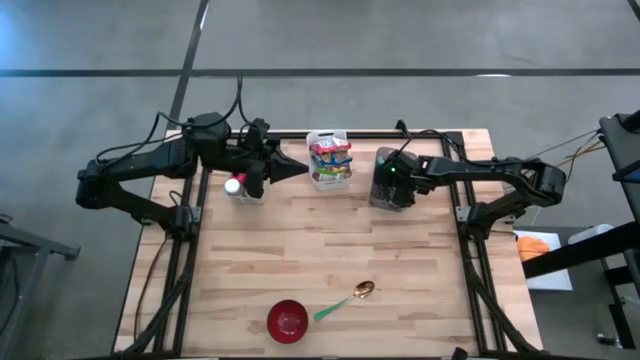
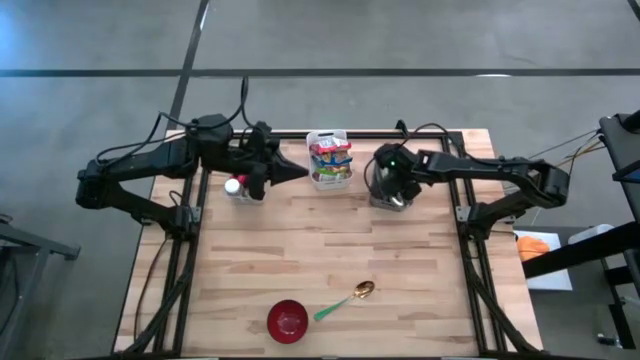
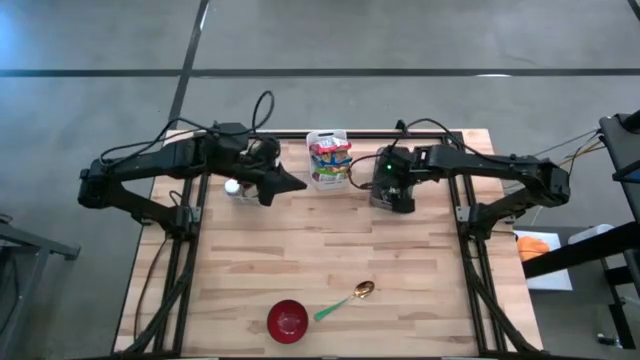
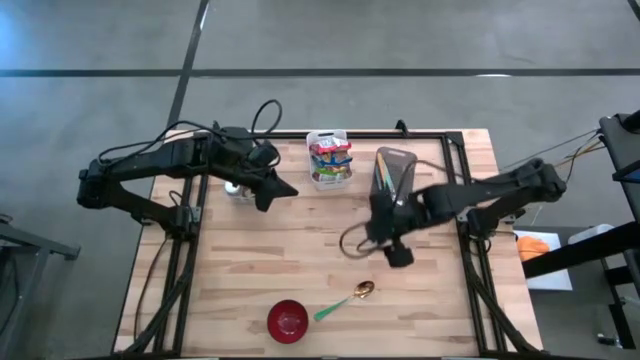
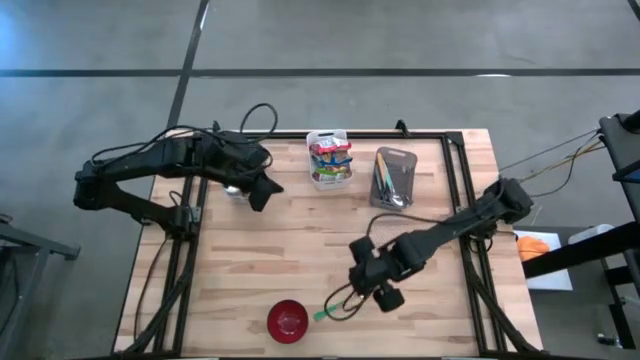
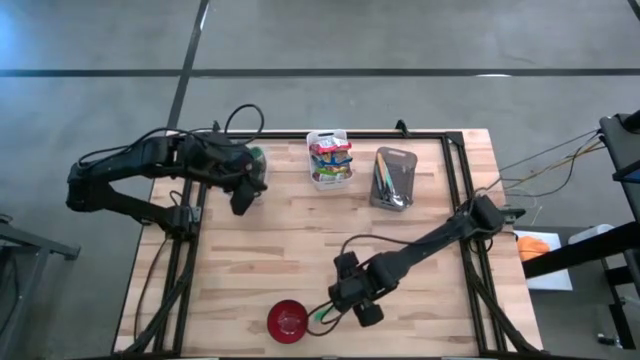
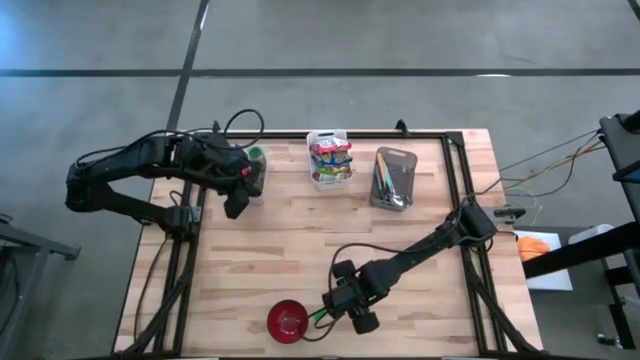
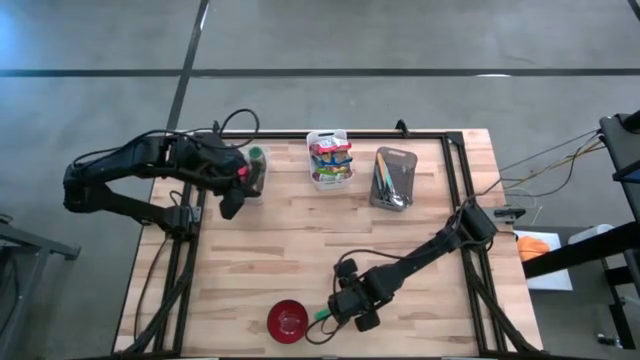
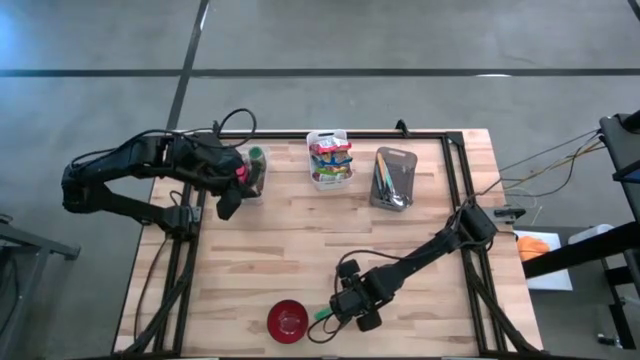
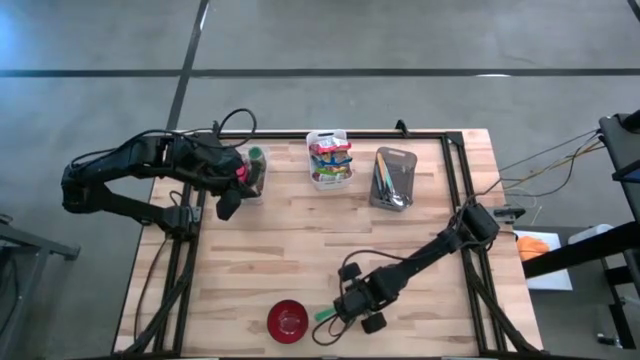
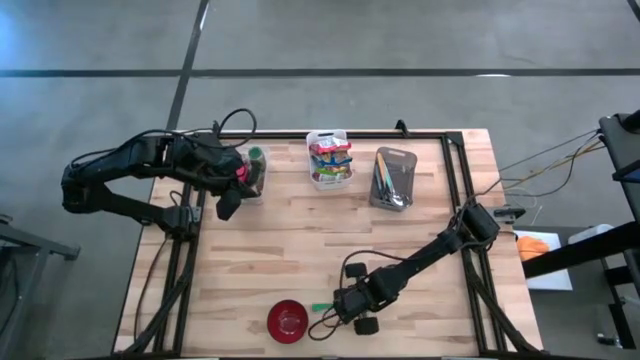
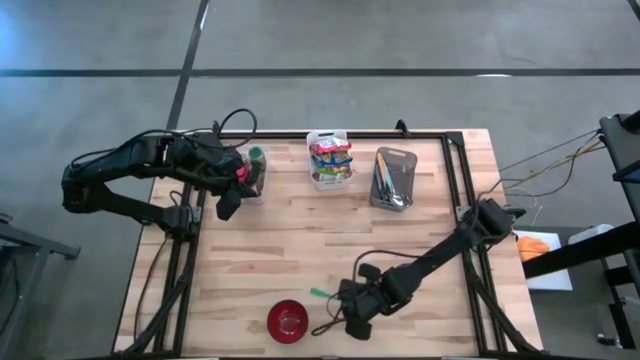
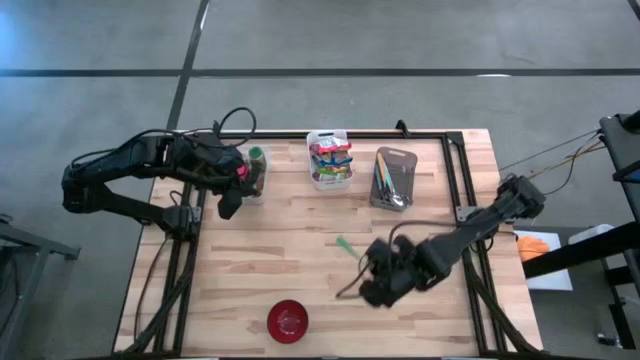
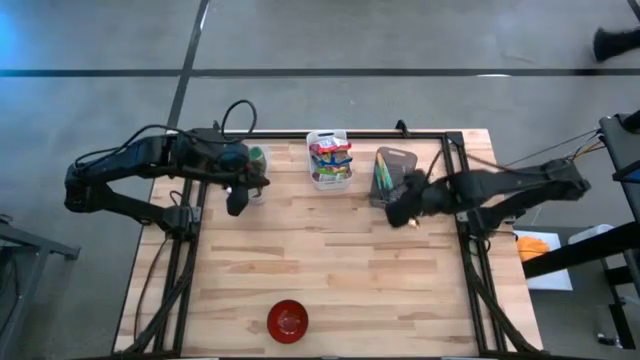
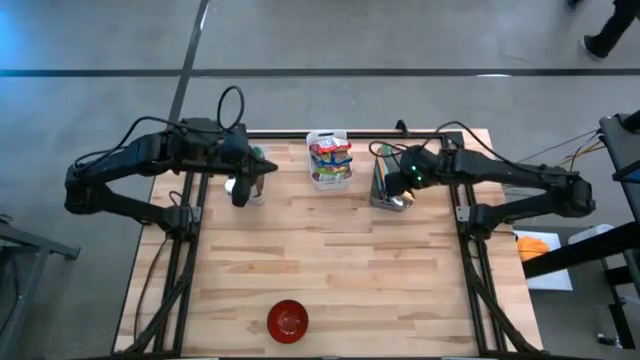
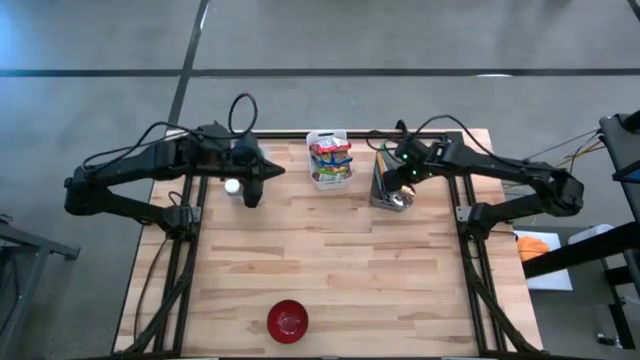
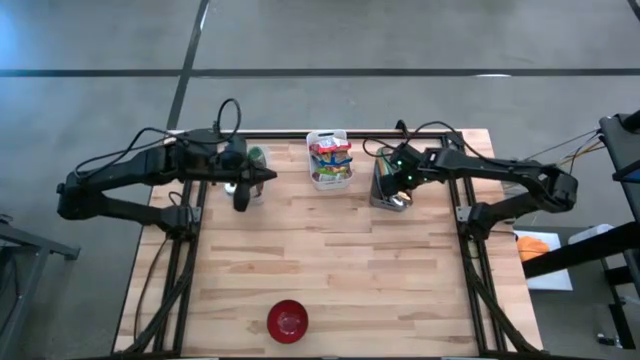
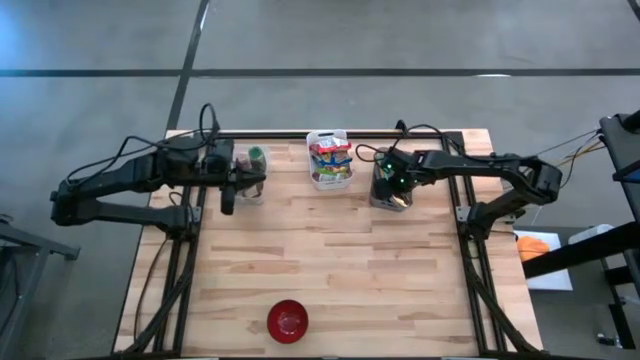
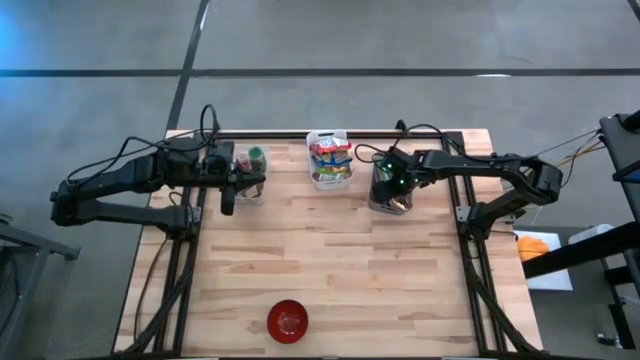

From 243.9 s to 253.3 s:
Put the green spoon into the black bin

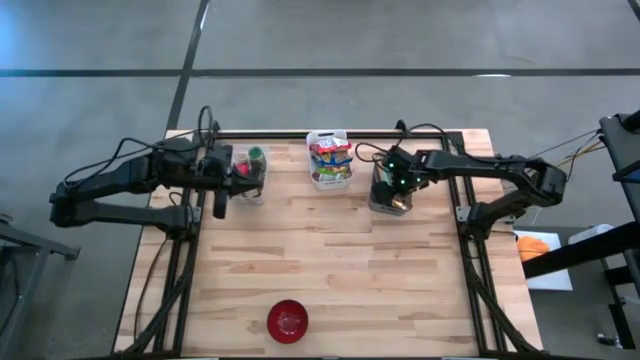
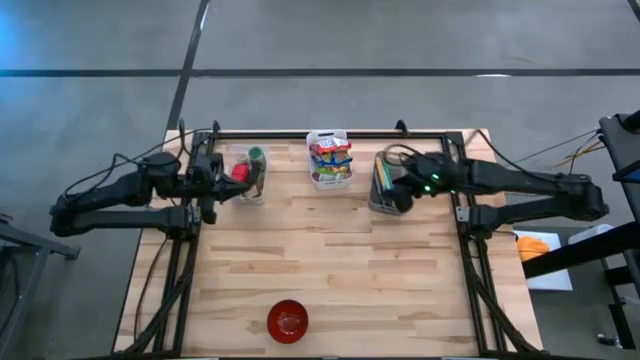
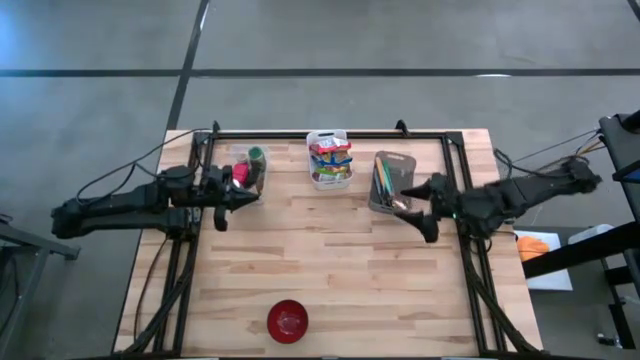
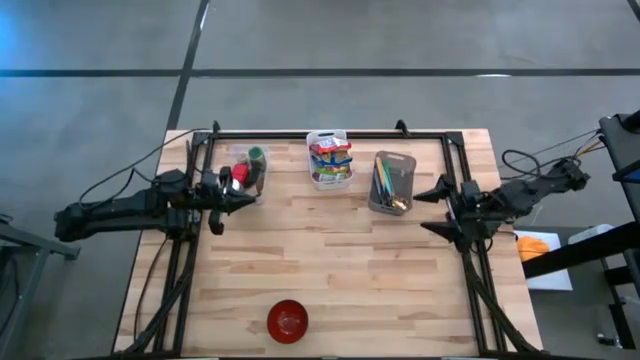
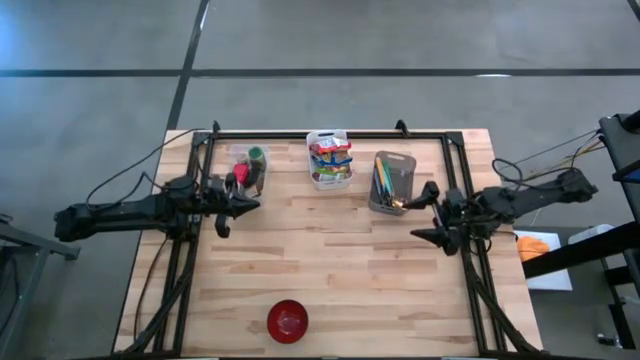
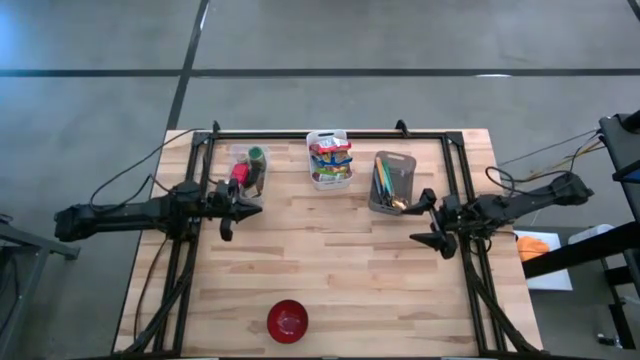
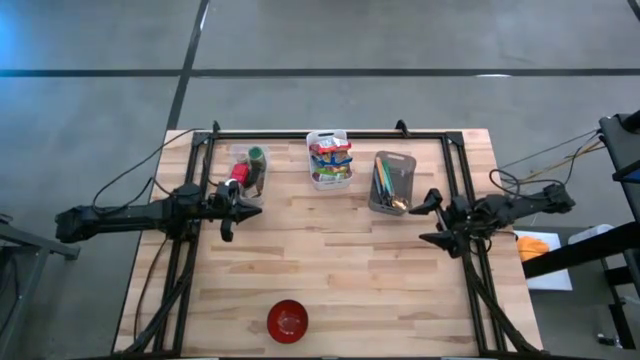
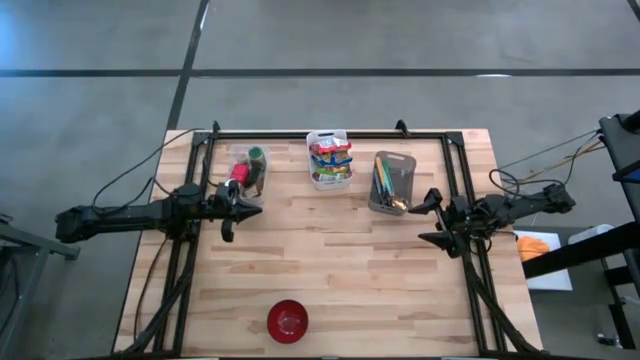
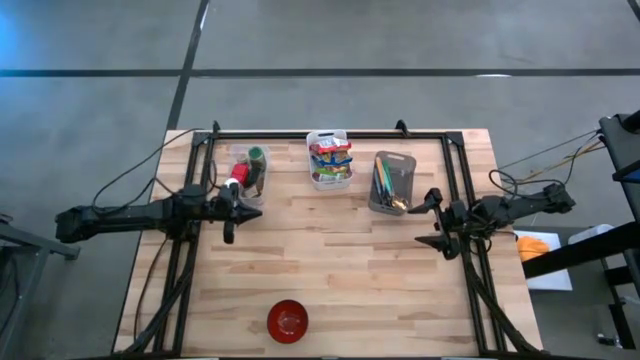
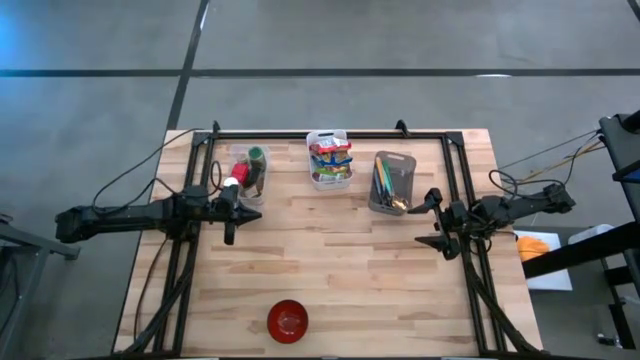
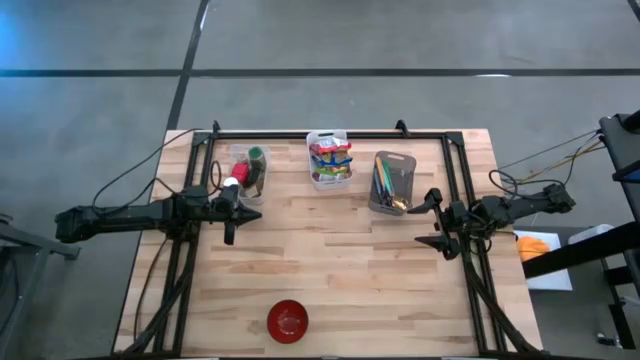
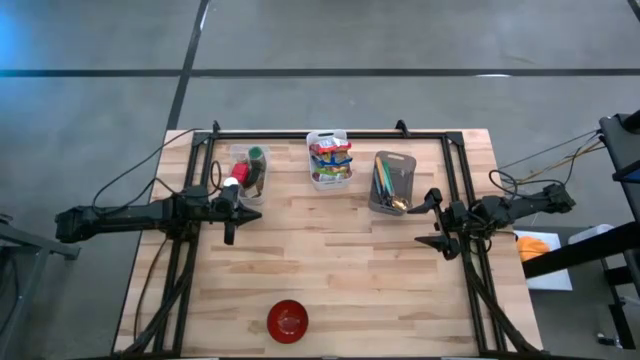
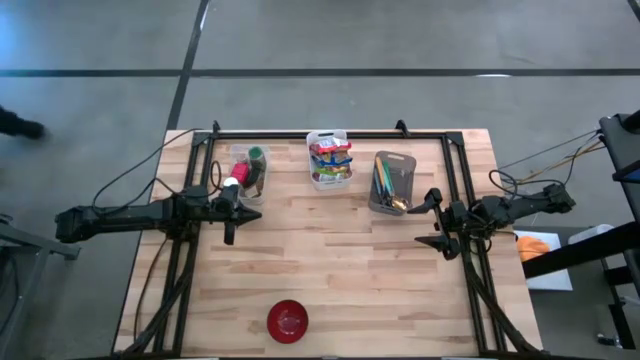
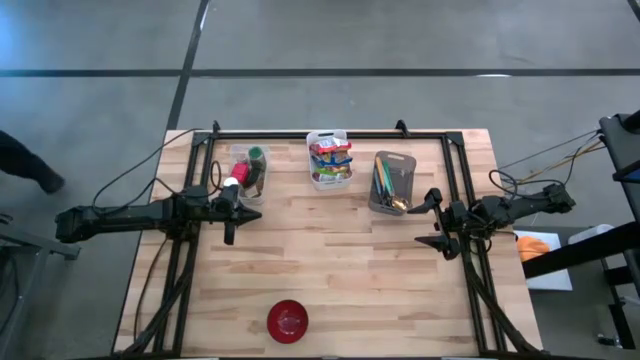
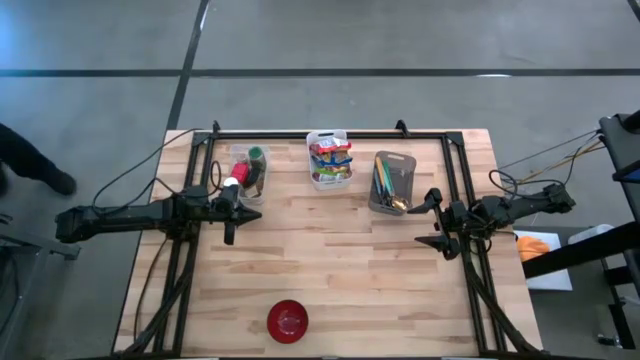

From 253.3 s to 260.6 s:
Return to Home Position

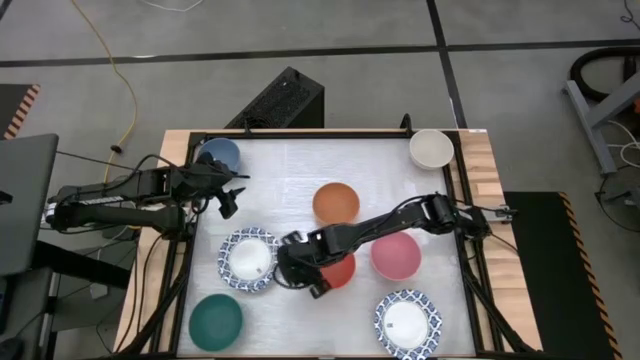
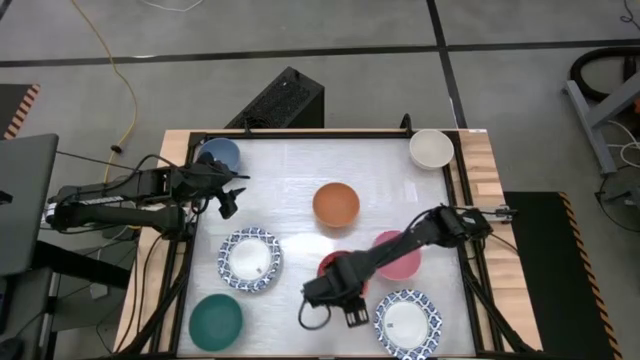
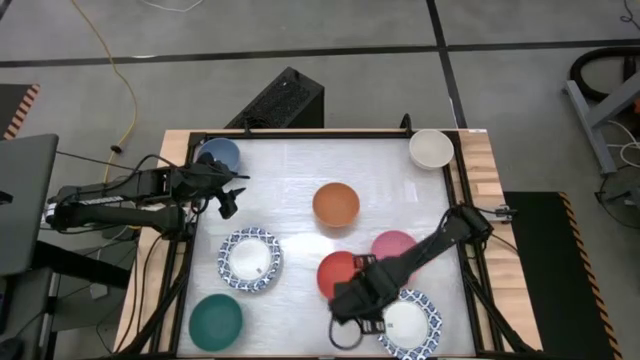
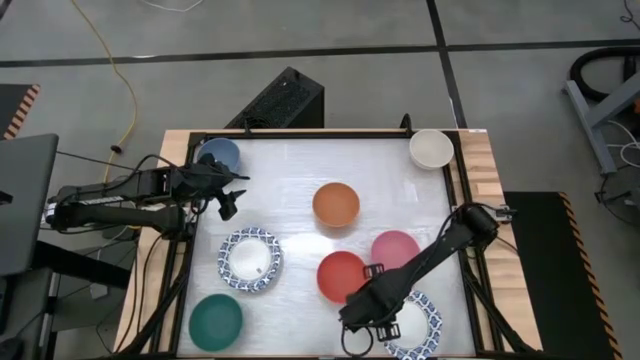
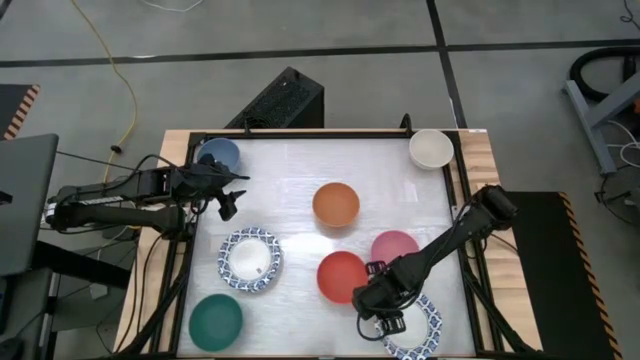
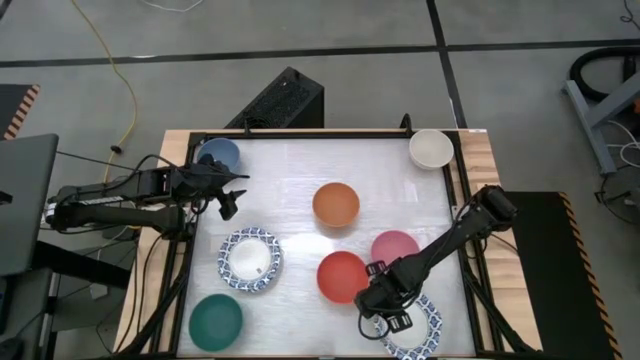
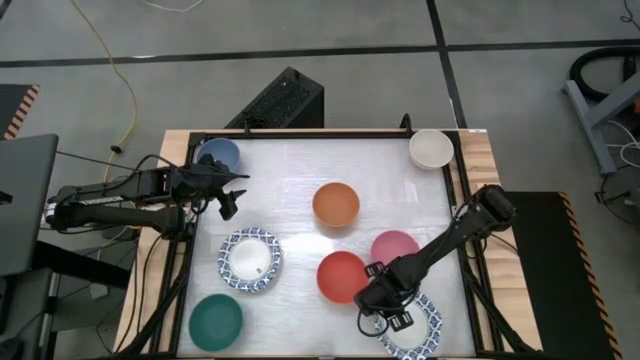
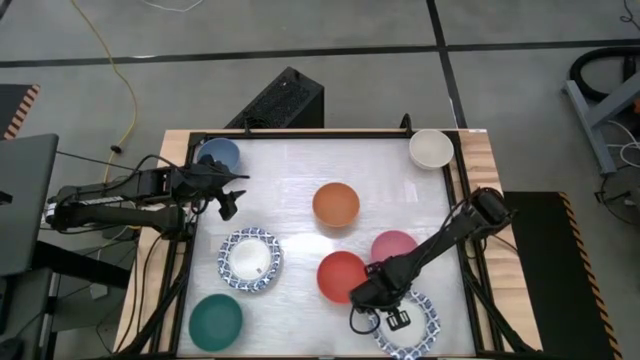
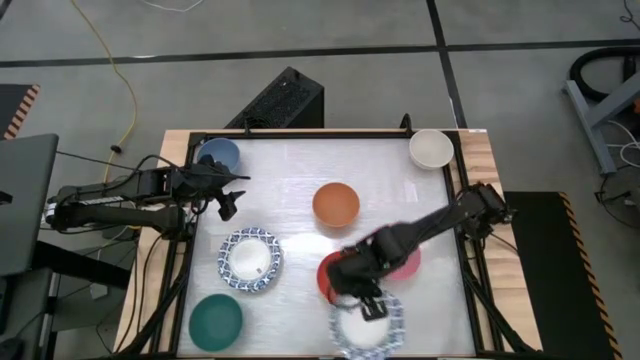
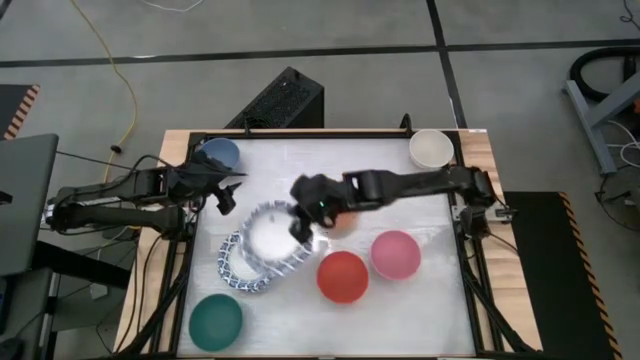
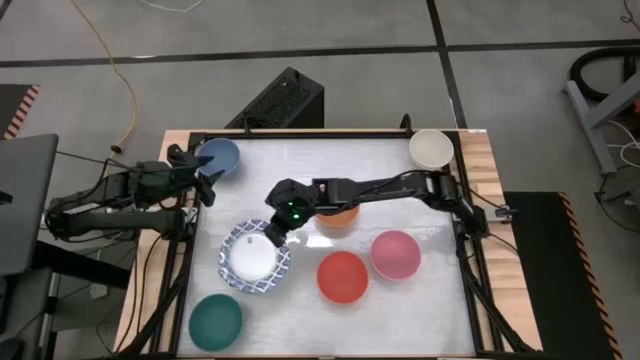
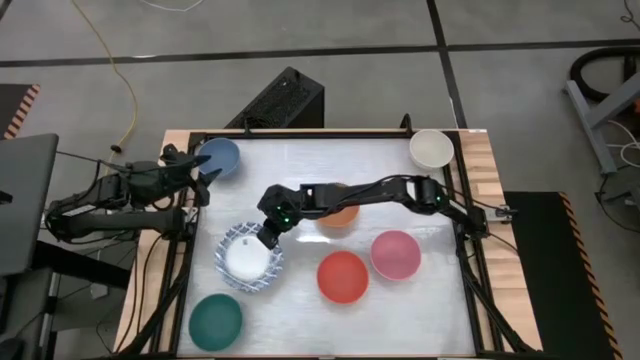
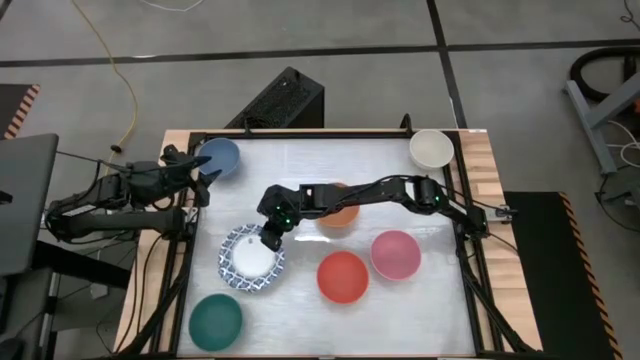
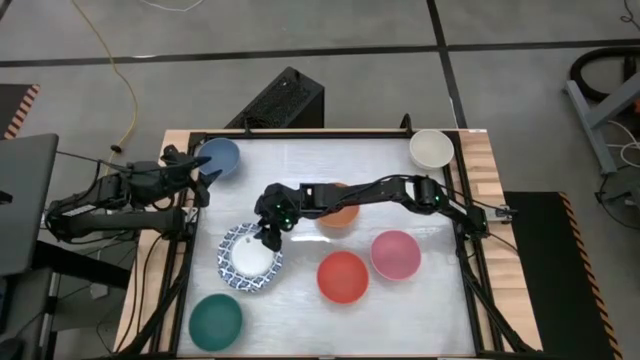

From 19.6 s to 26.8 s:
Stack the bottom white patterned bowl on top of the other top white patterned bowl
